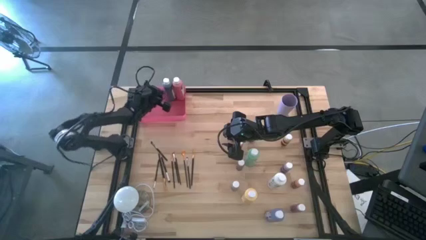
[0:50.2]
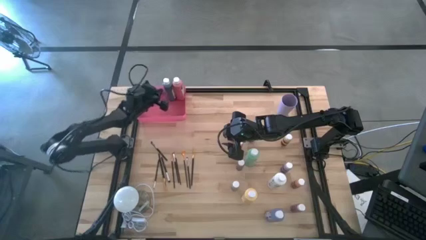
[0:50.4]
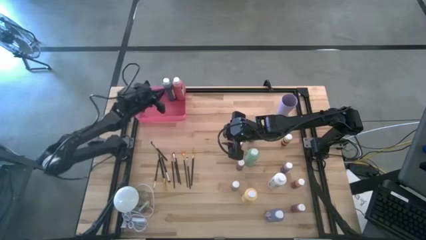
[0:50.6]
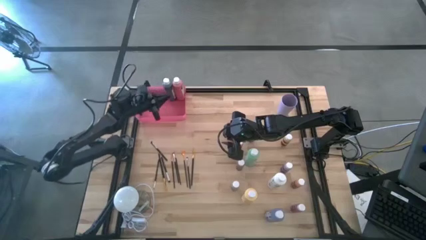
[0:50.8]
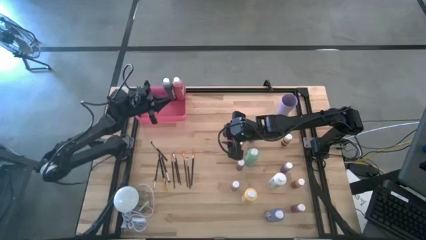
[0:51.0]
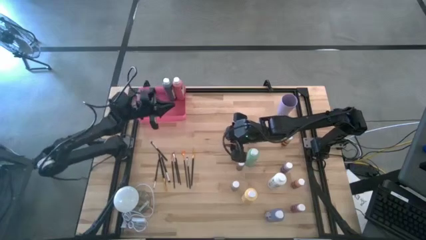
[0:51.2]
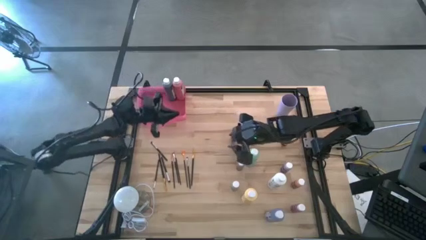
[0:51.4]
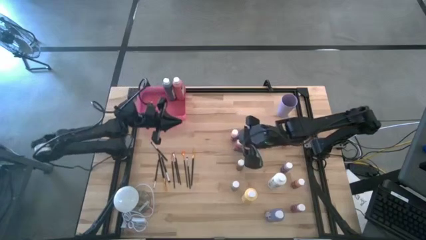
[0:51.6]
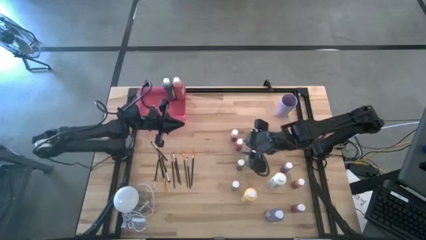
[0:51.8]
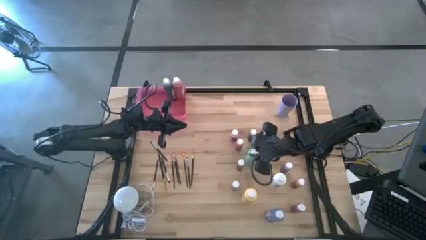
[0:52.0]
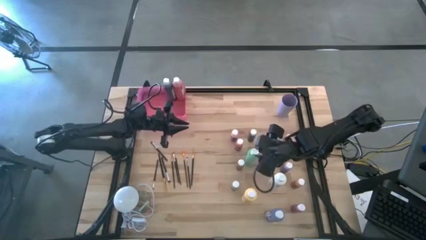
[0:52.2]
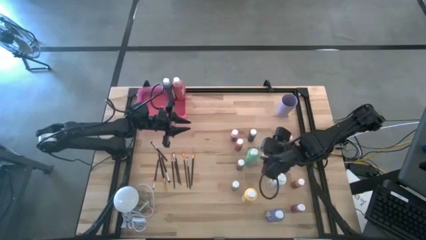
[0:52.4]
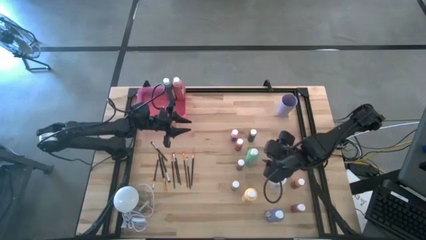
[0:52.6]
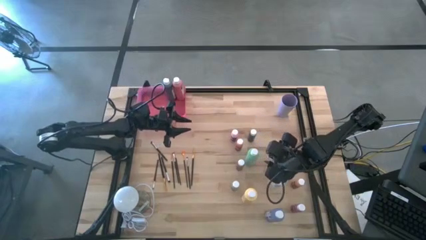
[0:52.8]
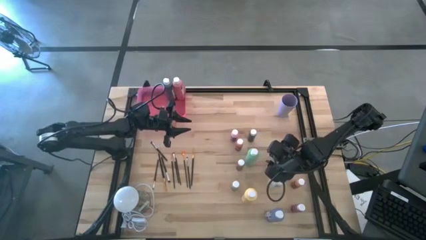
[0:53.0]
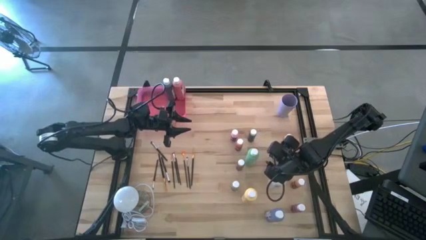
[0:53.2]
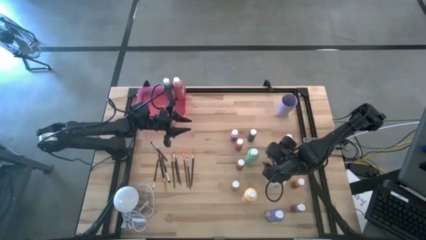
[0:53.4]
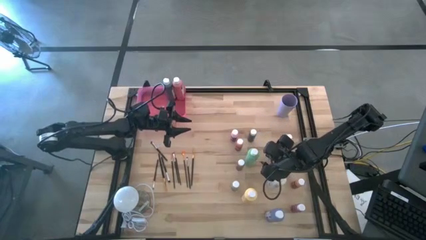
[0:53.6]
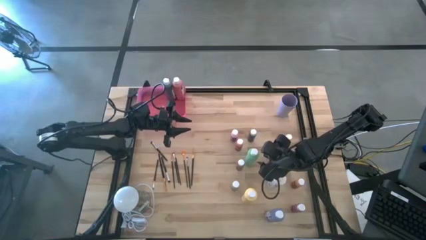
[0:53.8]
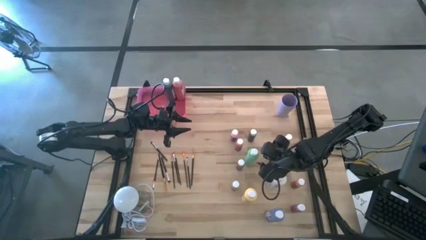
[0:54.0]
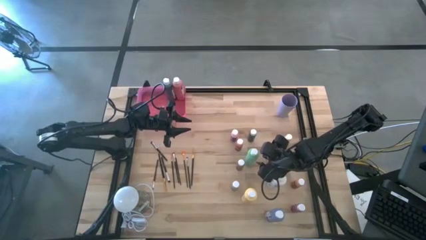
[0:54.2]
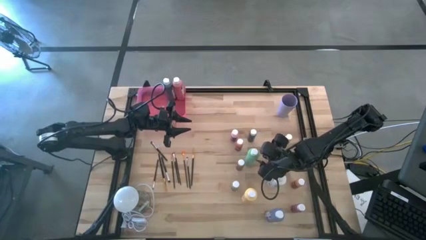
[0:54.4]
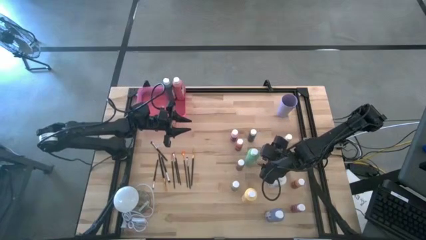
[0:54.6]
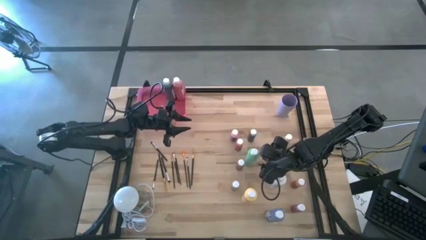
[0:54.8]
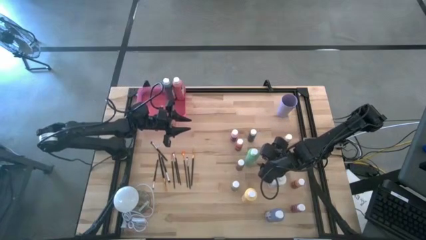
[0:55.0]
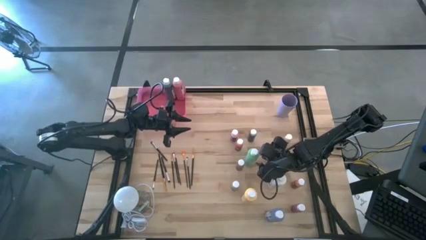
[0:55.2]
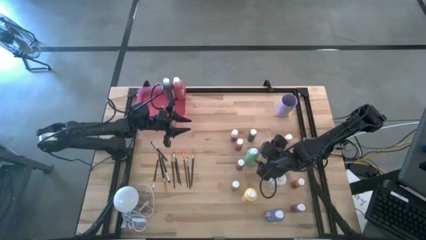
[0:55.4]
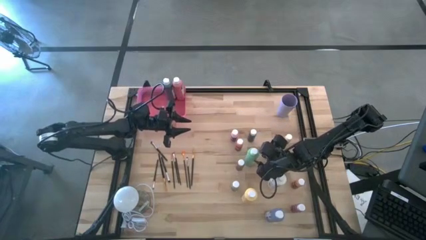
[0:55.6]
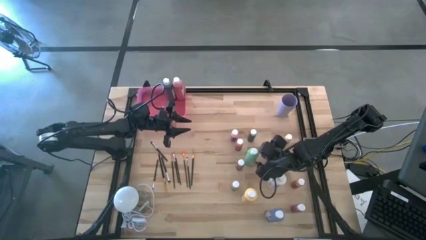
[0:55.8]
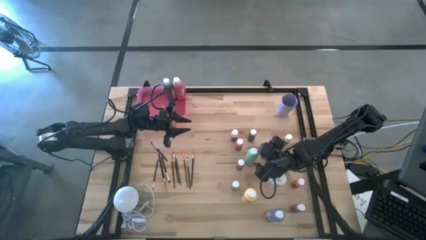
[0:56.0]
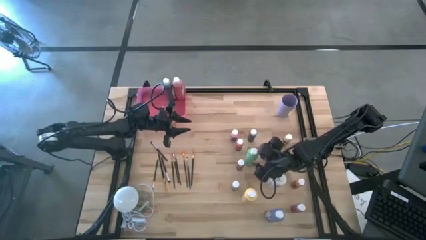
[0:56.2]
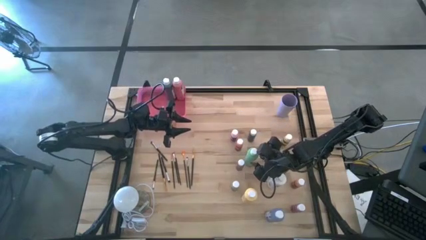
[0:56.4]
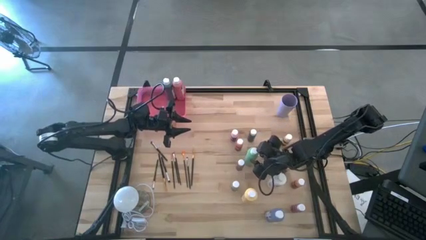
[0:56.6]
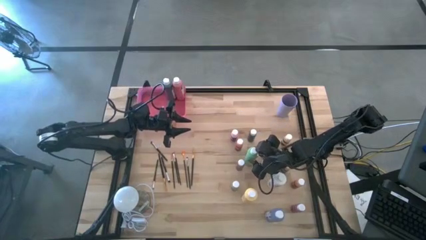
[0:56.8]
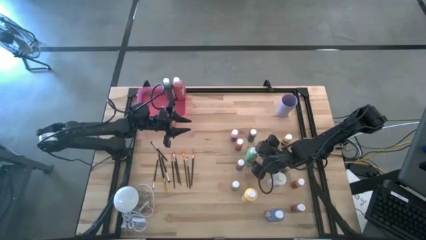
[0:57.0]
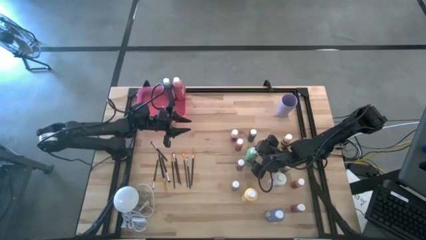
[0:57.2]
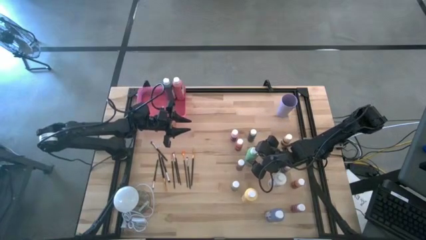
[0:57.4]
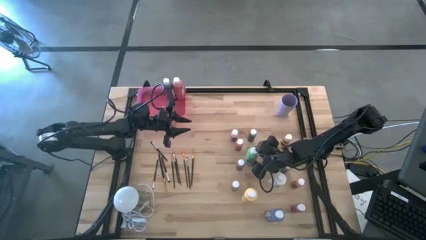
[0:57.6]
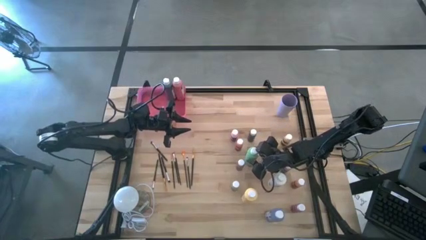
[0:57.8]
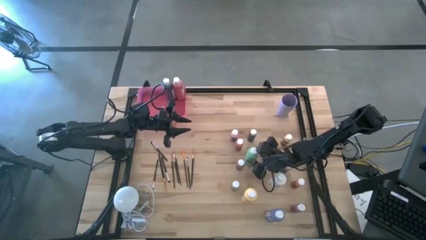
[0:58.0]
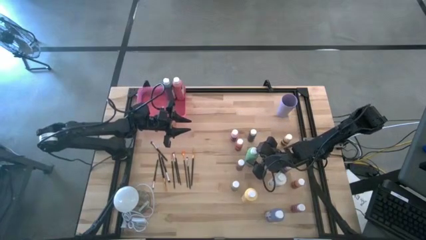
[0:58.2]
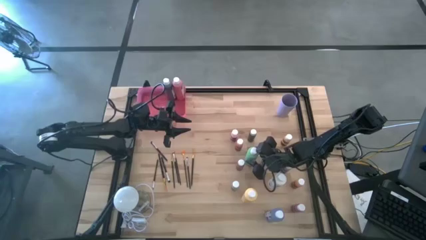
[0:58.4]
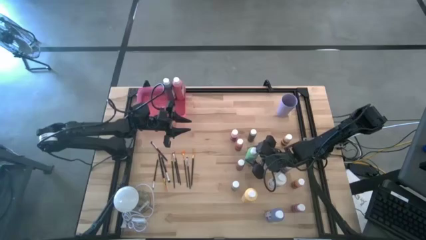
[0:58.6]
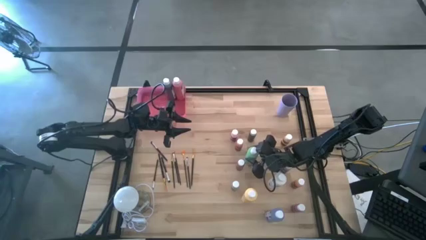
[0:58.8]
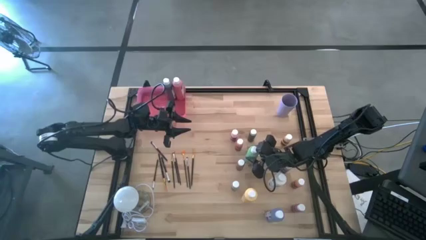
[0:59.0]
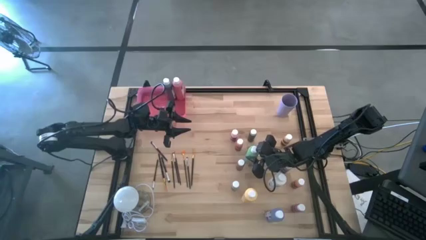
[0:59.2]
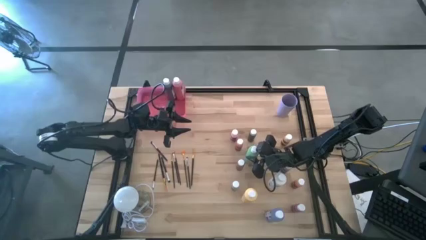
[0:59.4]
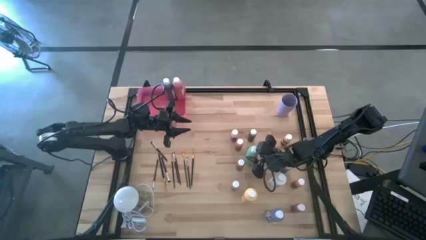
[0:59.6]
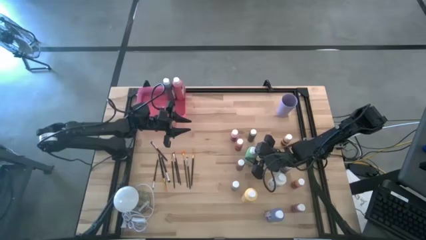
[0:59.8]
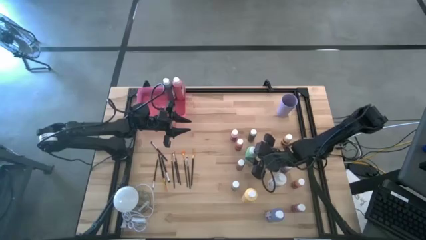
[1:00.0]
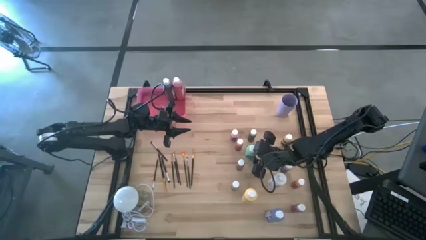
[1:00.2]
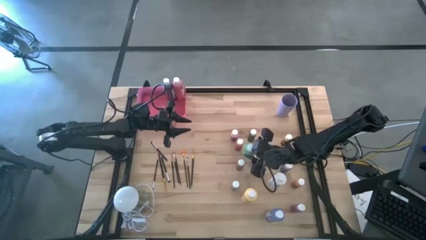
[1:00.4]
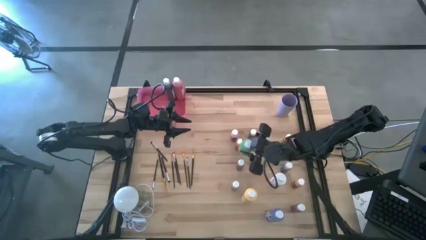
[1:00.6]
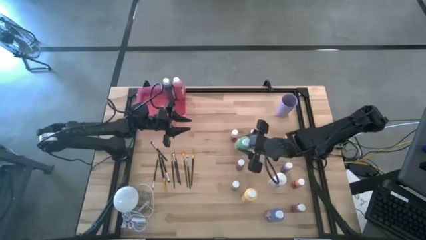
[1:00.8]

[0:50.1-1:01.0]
Task: Pick & Place Paint Supplies
Put the large green paint bottle into the pink bin

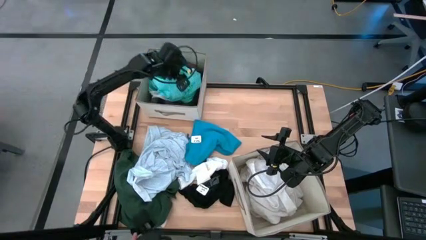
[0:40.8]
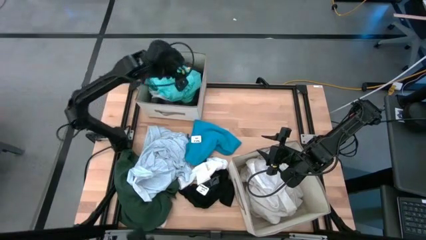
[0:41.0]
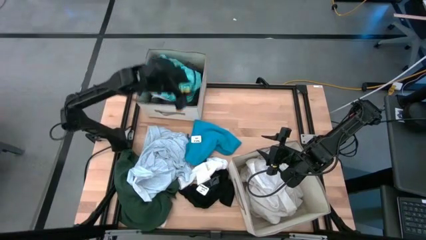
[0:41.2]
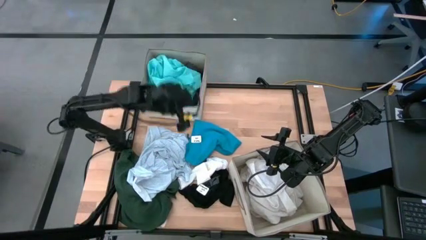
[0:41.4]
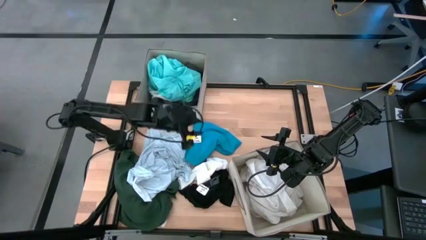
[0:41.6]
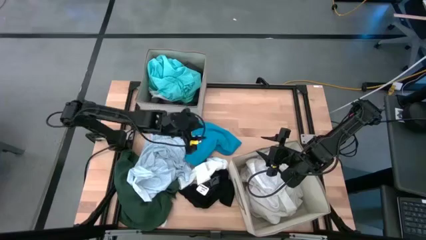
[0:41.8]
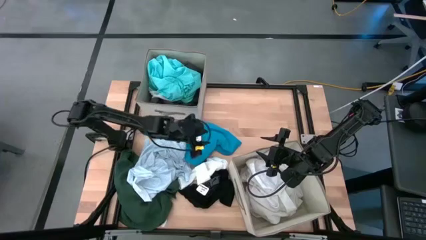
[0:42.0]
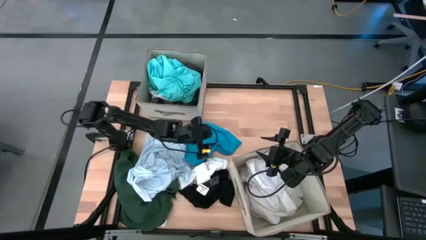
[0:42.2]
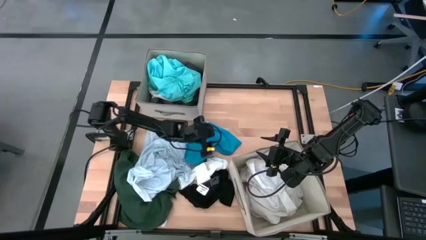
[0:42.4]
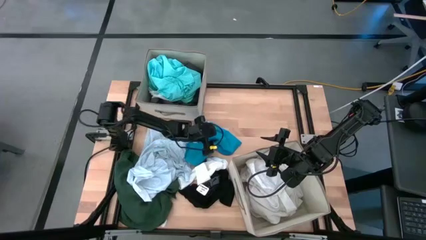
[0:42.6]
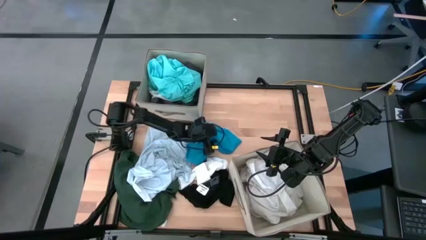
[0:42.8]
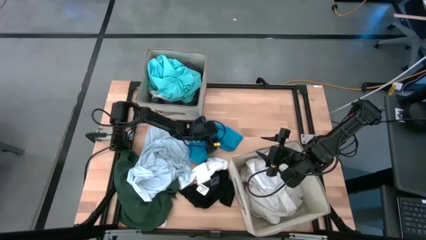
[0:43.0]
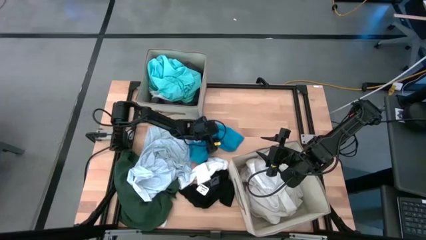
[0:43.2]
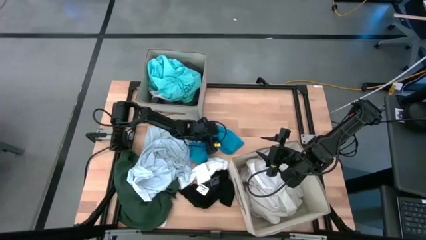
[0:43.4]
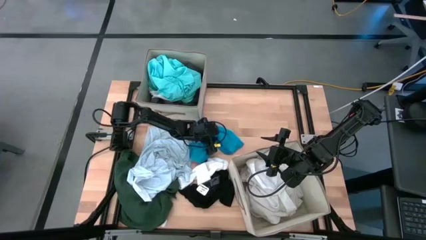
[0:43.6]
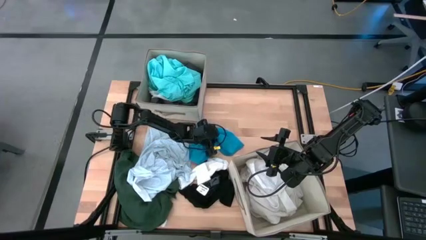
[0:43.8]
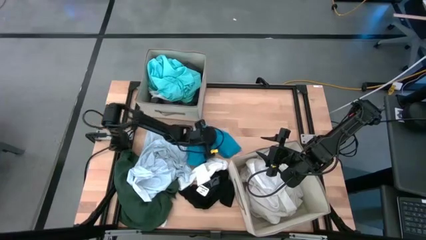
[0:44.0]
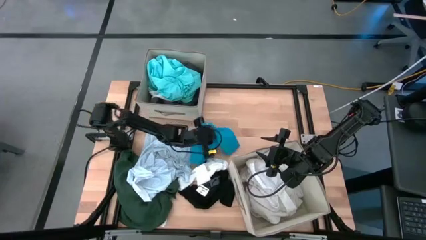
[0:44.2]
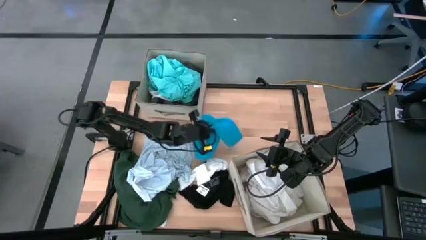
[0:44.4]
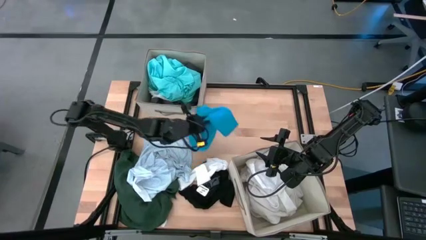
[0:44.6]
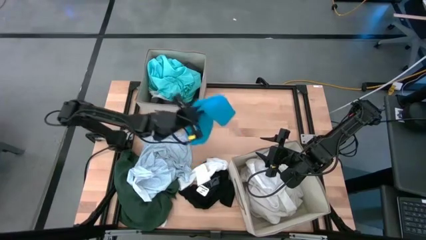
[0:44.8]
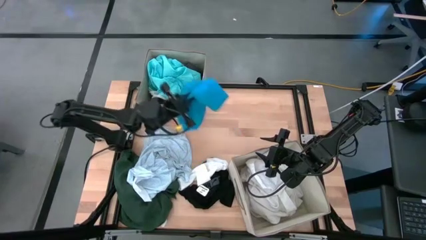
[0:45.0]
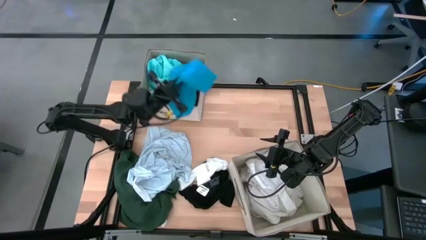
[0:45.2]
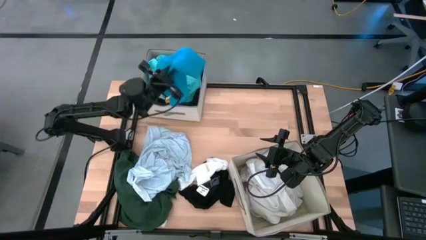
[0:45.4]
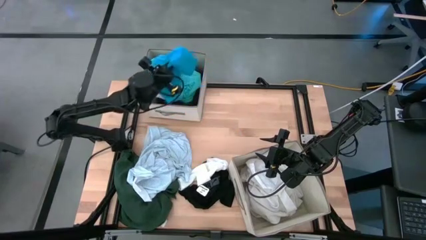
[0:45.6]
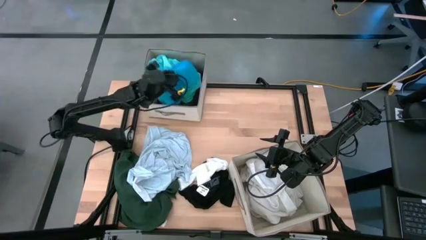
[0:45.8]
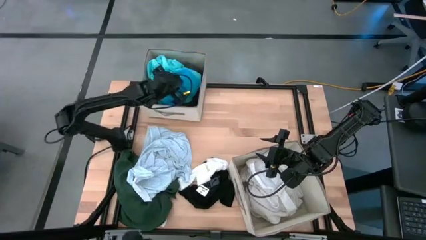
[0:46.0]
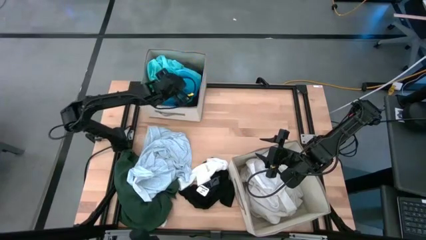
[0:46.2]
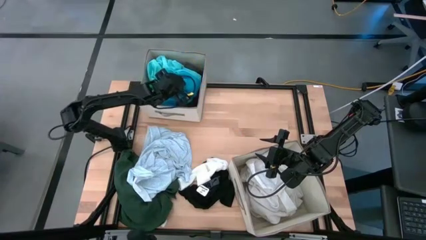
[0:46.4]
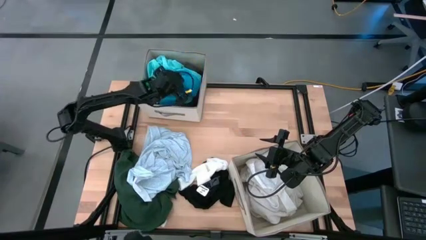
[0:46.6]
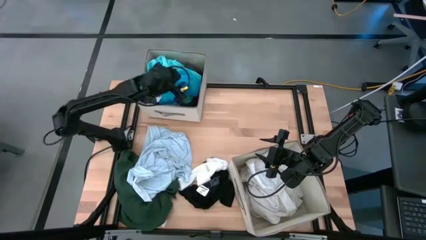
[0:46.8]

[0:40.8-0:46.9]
Task: Sort clothes
Put the blue shorts into the top white laundry bin
